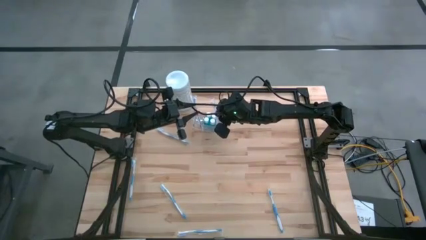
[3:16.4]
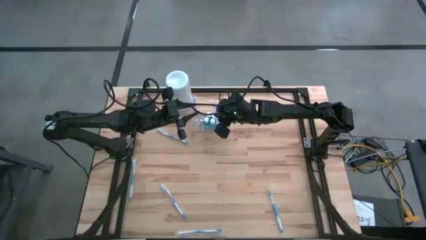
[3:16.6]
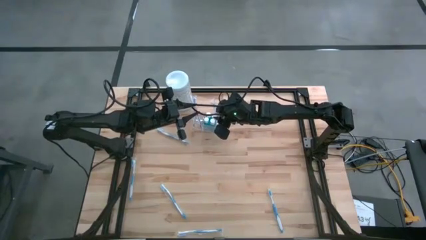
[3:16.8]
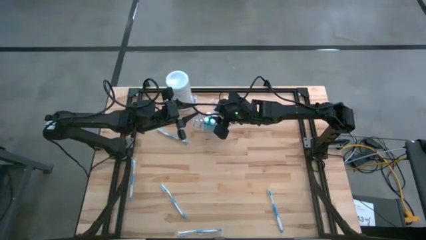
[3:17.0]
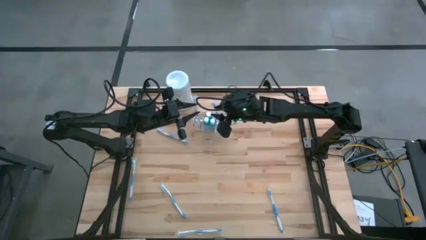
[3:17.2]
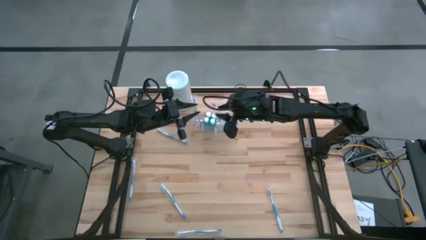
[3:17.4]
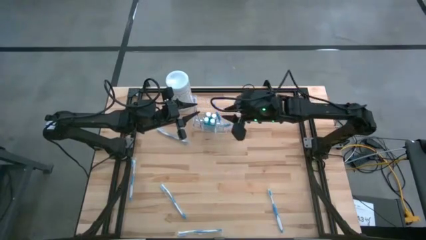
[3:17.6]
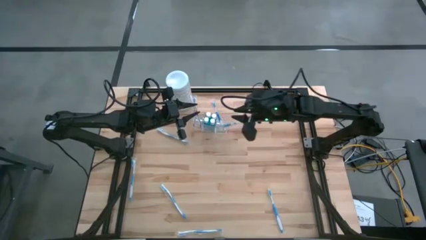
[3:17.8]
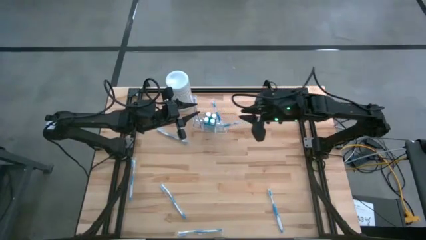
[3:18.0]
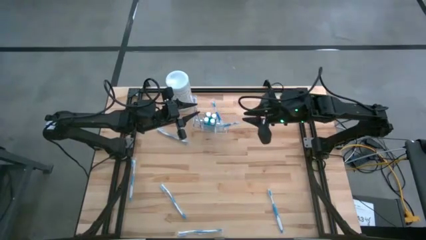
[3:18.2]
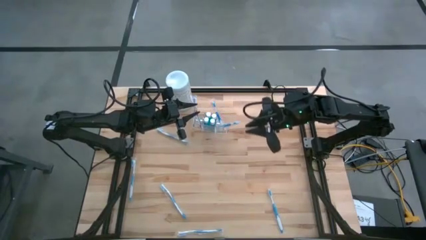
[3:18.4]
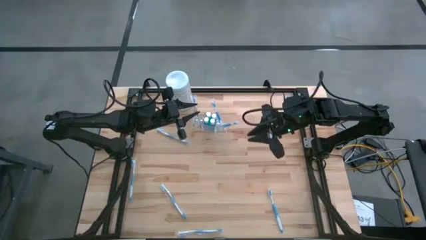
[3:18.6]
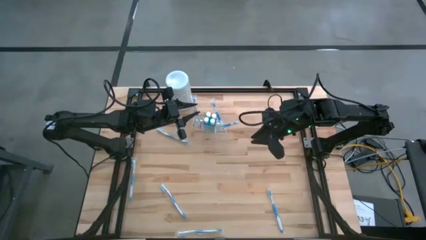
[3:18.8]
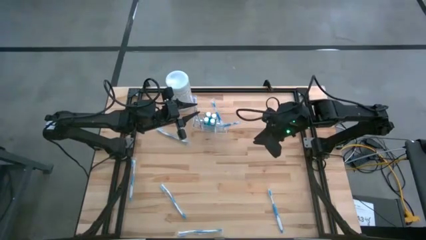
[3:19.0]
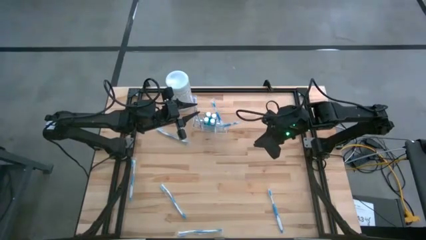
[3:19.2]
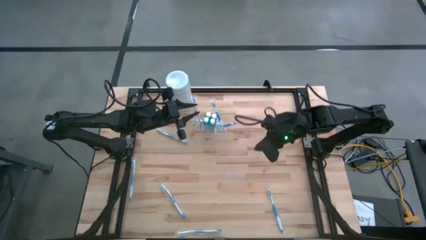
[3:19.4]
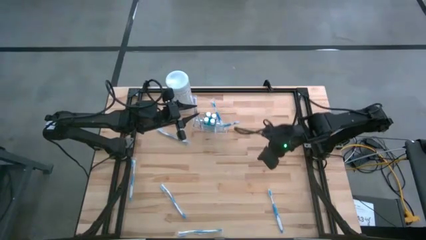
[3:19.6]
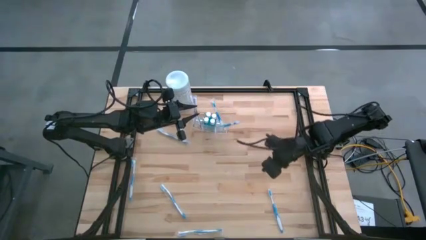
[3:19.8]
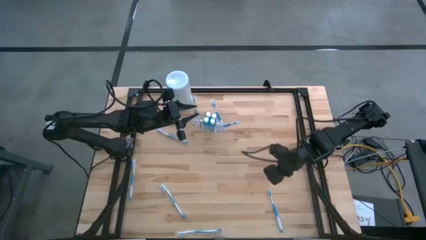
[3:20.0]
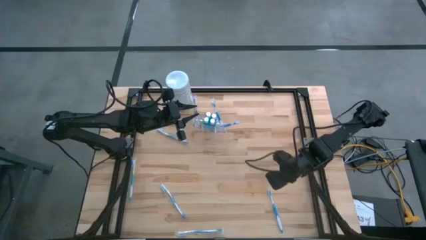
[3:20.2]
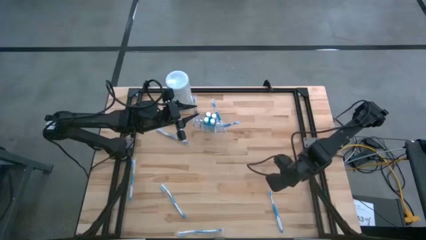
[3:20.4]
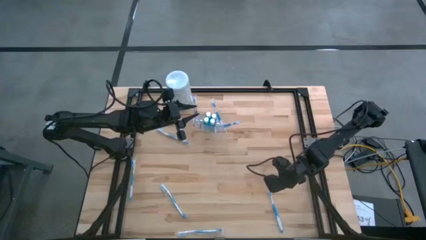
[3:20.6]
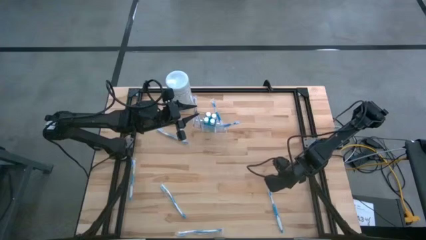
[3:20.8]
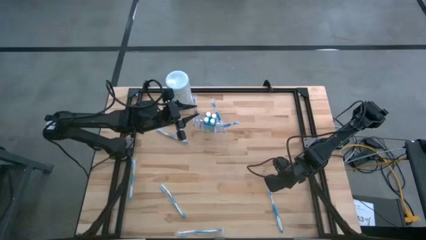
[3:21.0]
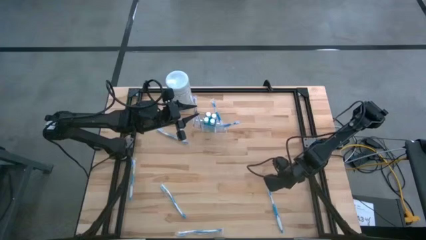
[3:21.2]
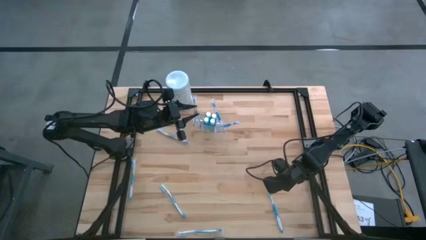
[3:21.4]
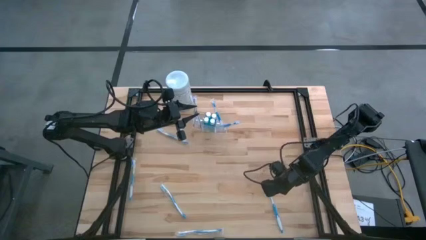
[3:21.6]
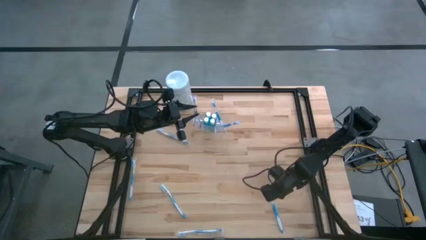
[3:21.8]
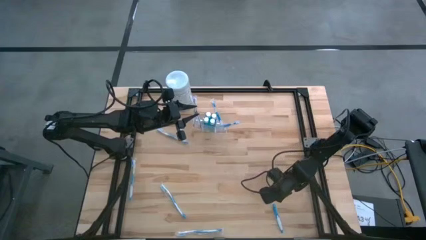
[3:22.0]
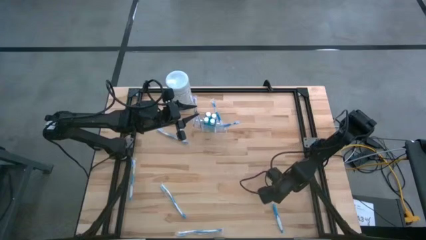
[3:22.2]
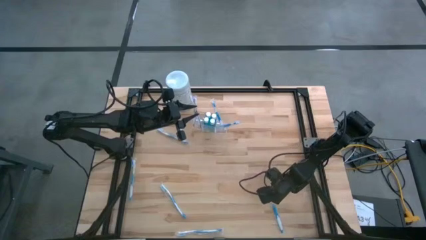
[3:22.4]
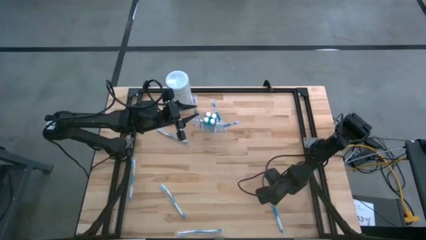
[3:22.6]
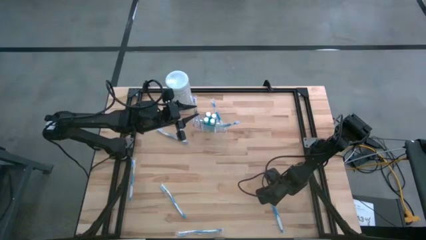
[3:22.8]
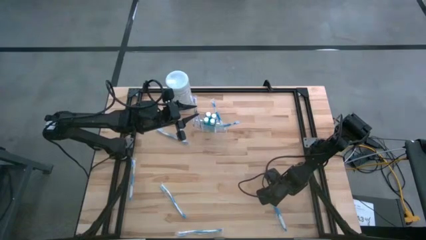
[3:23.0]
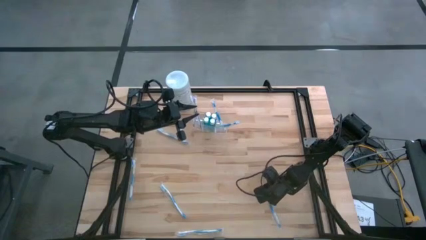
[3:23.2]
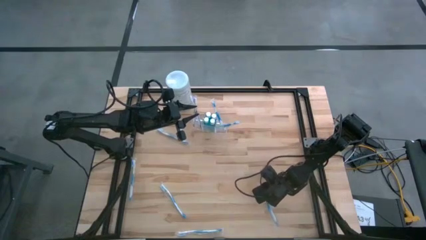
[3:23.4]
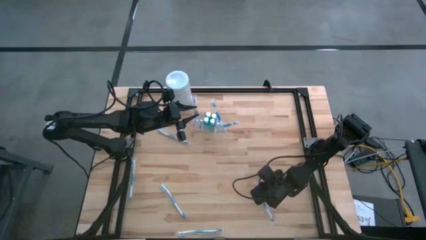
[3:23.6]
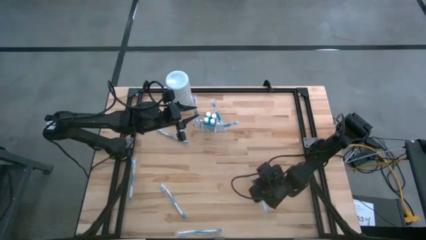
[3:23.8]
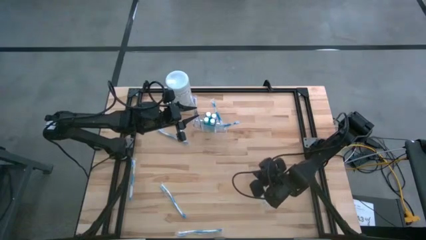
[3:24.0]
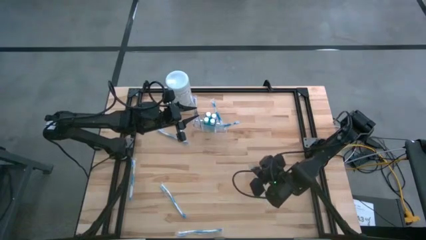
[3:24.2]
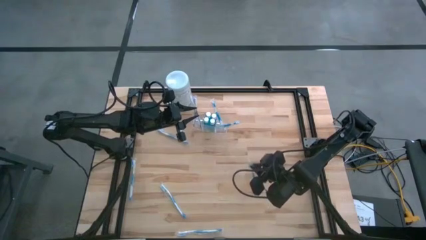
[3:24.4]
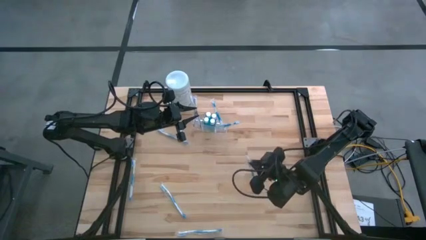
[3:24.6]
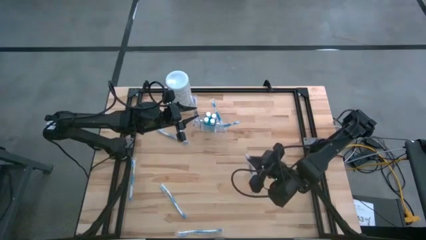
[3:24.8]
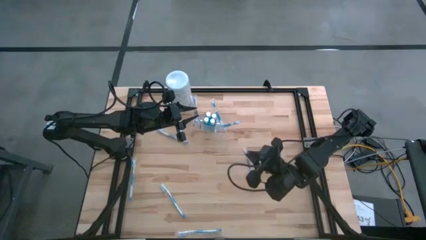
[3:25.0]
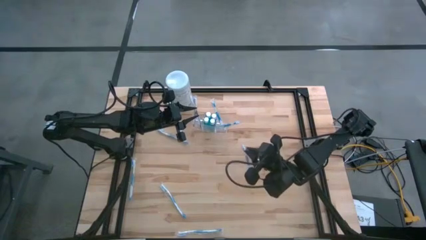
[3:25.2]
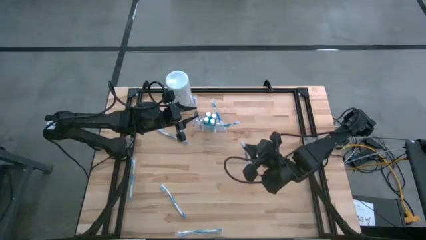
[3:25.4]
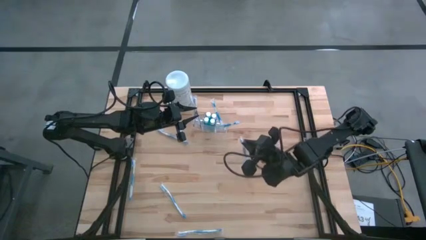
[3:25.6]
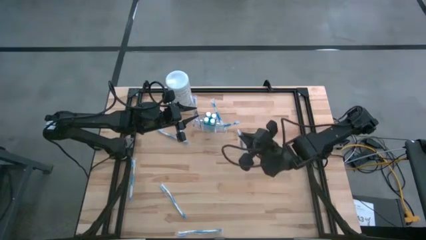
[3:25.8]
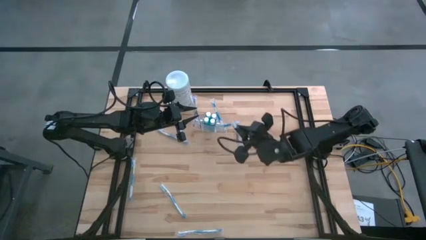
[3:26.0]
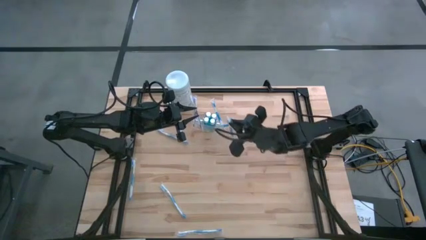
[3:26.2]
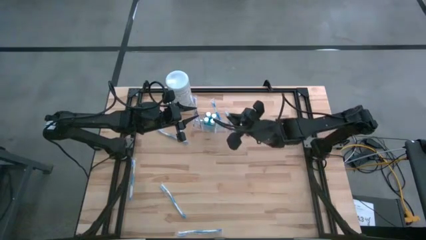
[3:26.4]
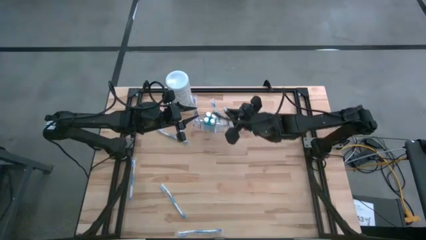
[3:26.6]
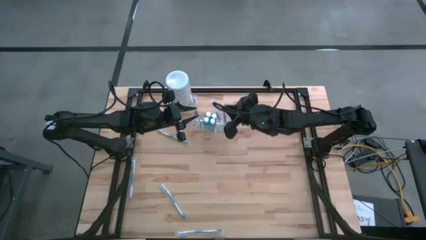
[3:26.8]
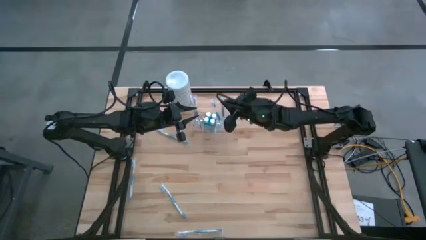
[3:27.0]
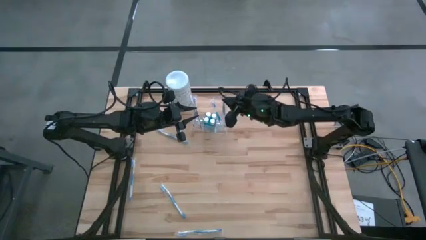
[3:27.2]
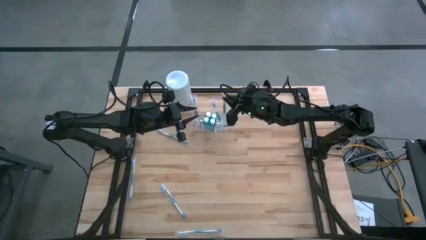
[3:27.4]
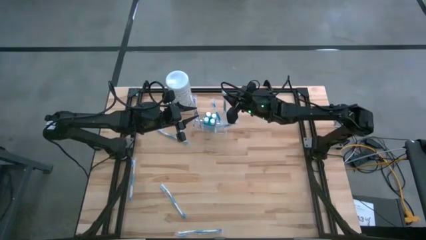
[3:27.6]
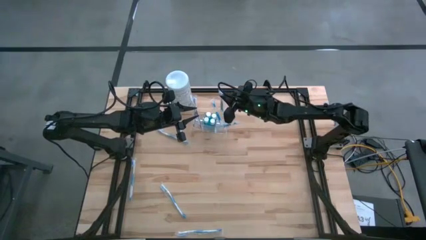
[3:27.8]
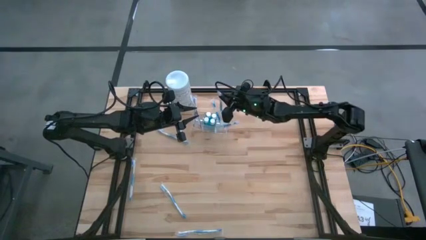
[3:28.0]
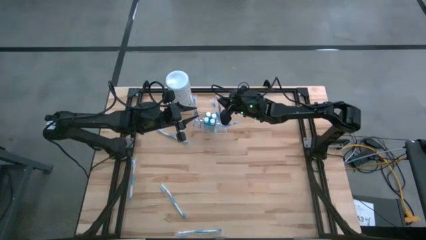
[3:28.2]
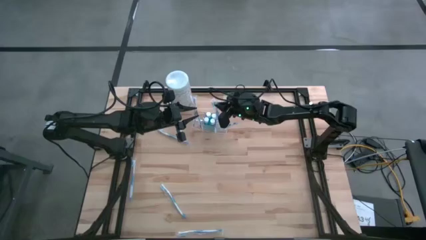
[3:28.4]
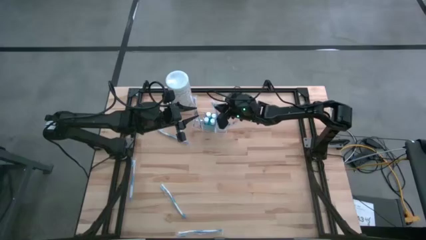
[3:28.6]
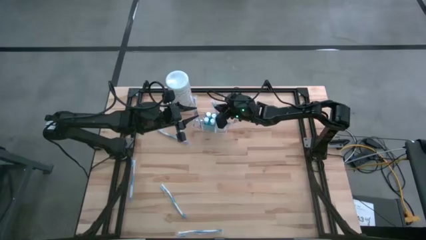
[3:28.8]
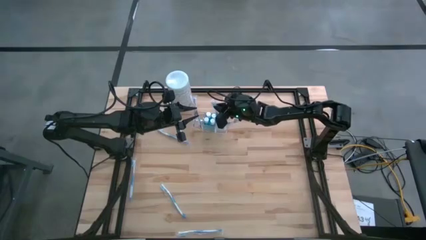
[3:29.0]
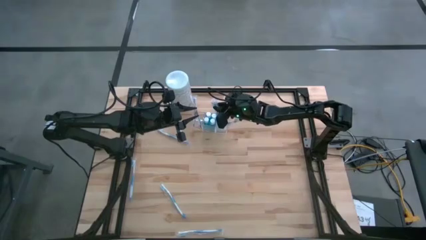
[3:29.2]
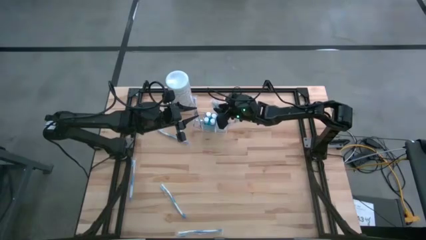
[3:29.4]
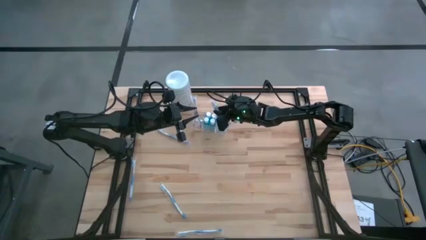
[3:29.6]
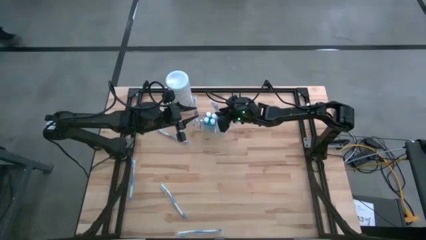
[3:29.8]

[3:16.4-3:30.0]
Task: Pick & Place toothbrushing station
Put the blue toothbrush into the right of the transparent organizer

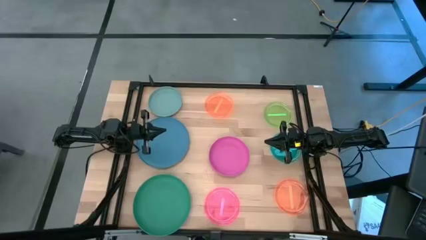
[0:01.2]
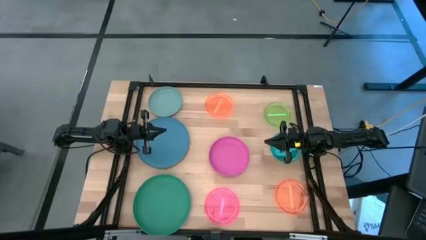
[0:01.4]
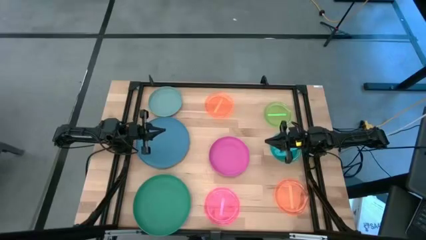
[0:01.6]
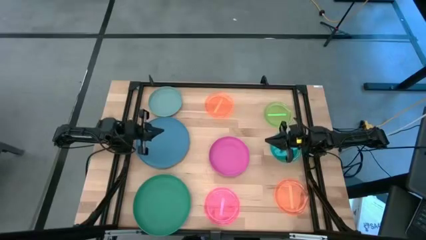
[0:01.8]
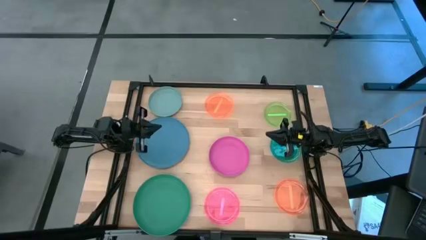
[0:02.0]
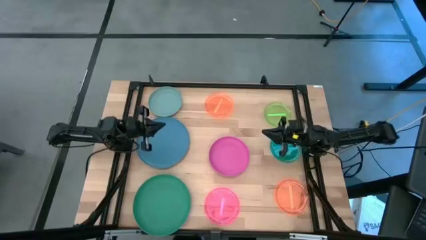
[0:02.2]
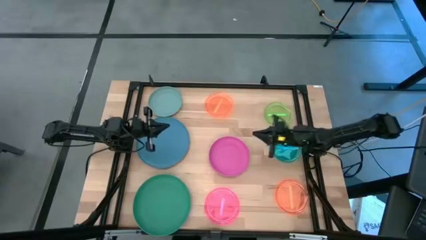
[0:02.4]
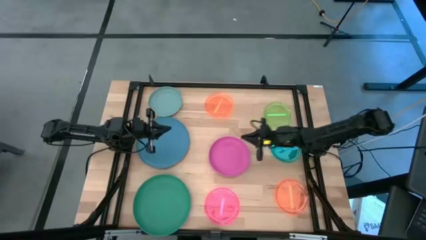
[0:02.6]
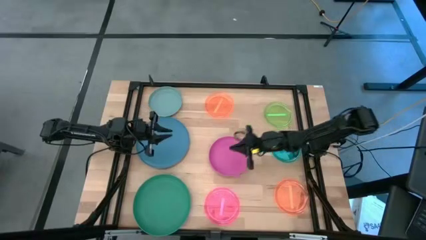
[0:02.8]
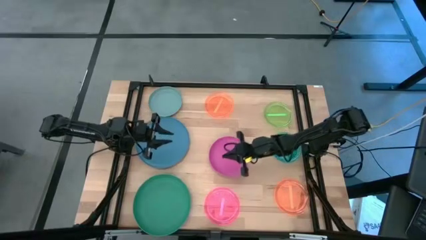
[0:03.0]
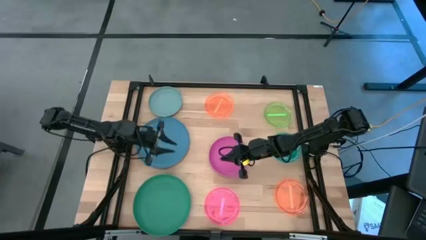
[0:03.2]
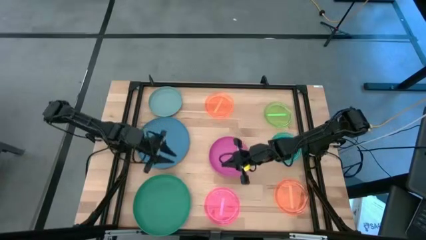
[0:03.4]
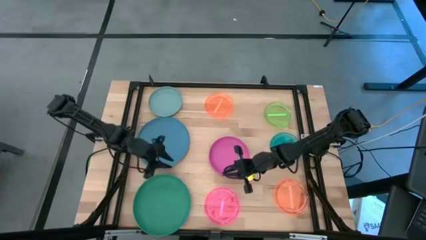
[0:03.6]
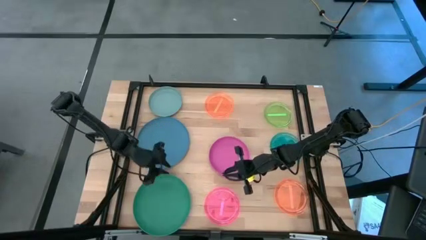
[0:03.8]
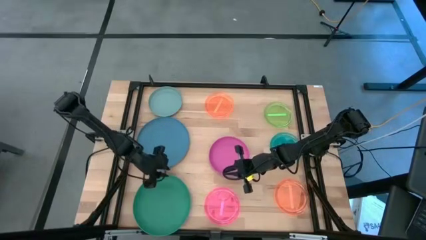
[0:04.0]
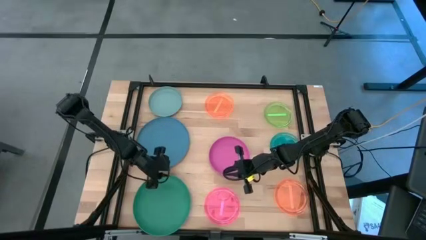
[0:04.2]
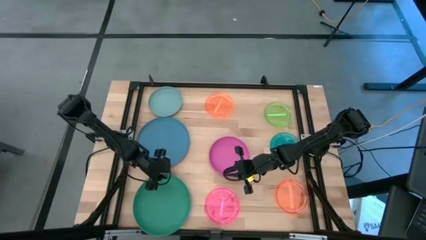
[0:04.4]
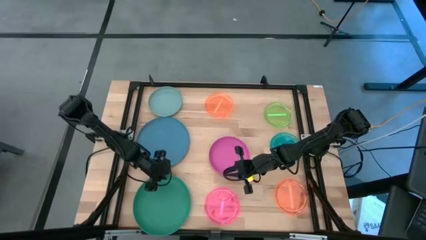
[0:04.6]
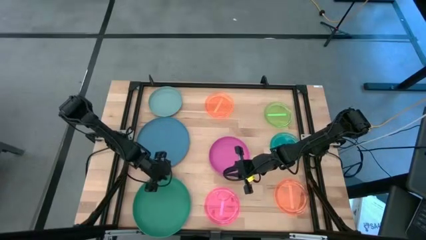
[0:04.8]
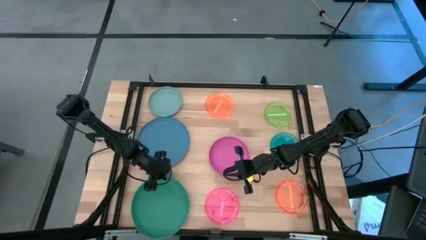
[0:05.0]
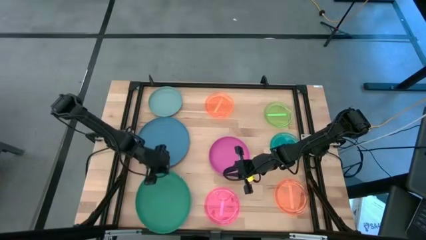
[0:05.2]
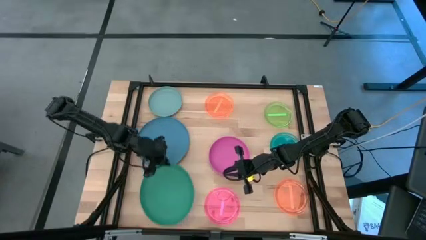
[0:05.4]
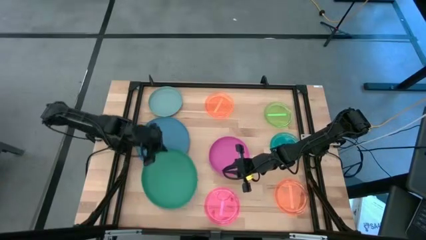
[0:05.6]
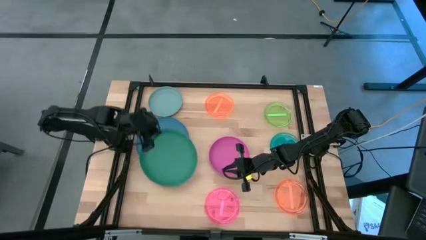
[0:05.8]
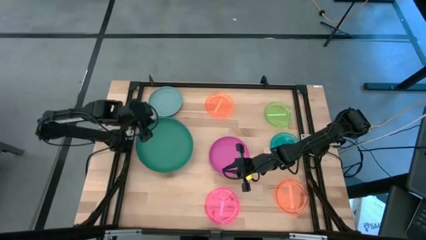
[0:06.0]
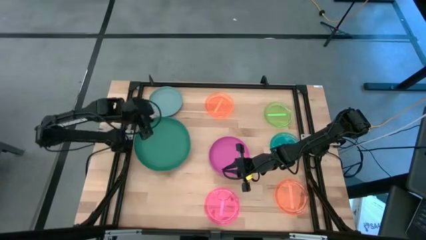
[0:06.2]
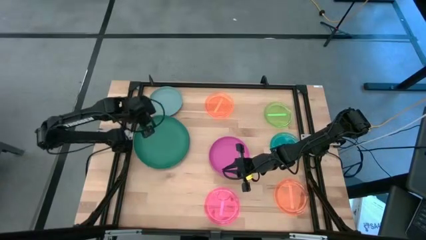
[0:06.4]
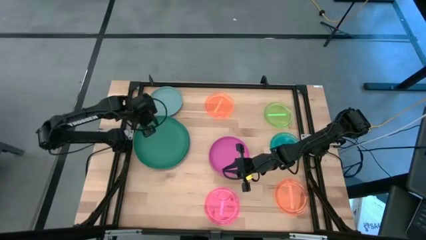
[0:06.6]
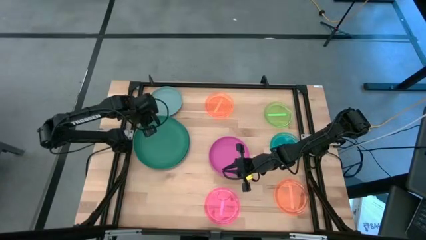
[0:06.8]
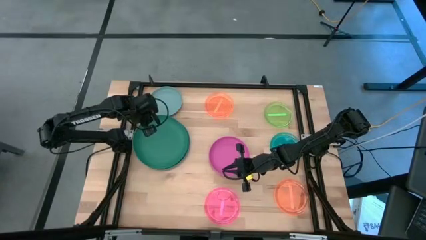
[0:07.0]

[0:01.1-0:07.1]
Task: Stack plastic plates
Stack the big green plate on top of the big blue plate
